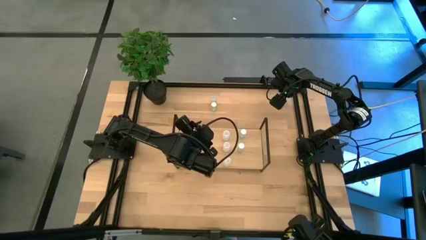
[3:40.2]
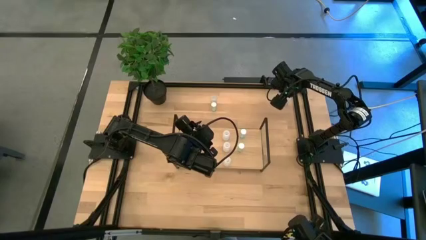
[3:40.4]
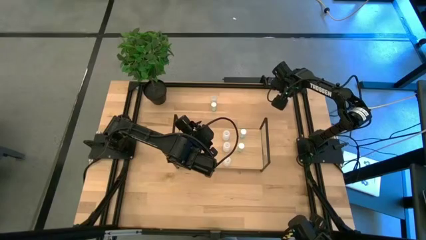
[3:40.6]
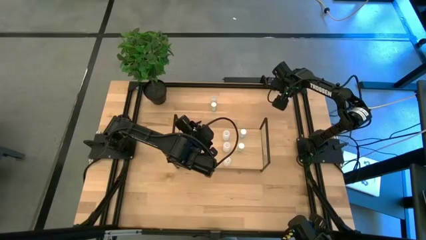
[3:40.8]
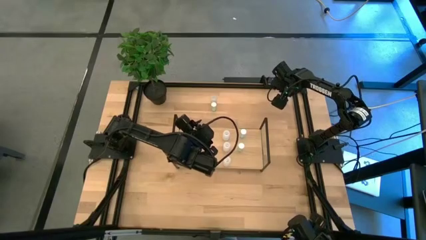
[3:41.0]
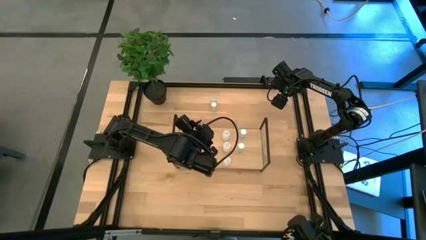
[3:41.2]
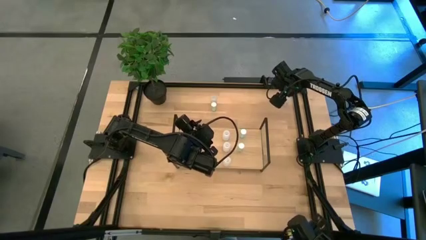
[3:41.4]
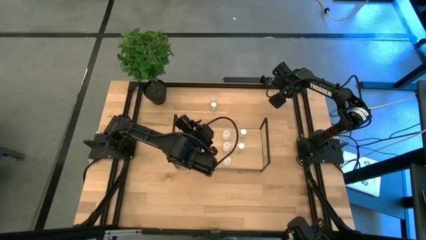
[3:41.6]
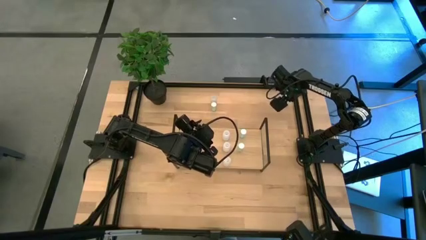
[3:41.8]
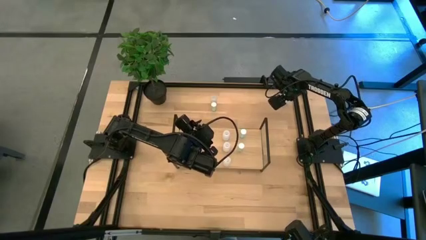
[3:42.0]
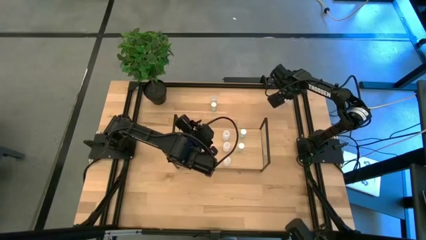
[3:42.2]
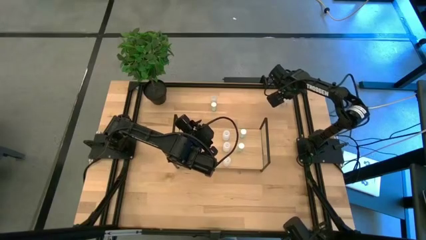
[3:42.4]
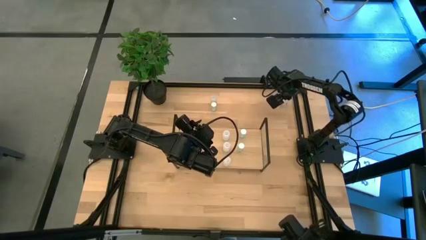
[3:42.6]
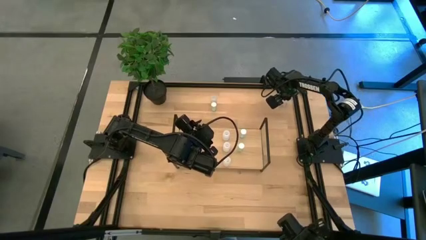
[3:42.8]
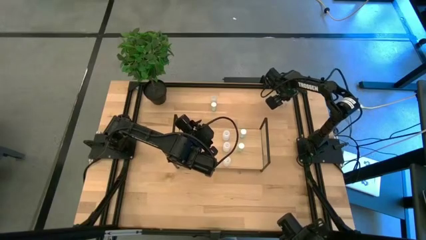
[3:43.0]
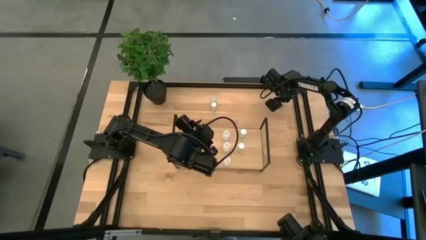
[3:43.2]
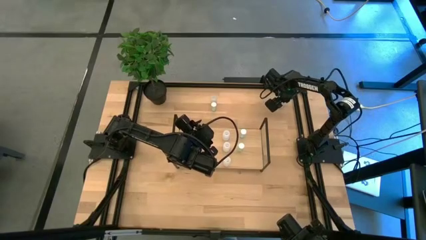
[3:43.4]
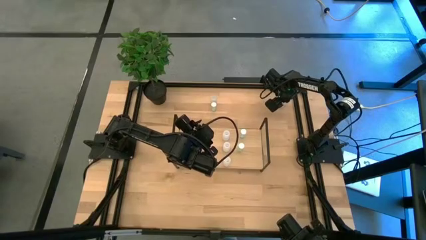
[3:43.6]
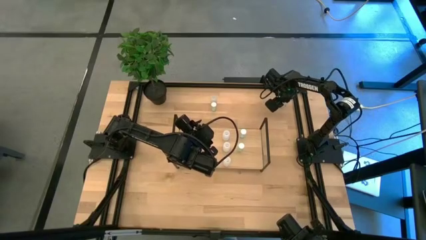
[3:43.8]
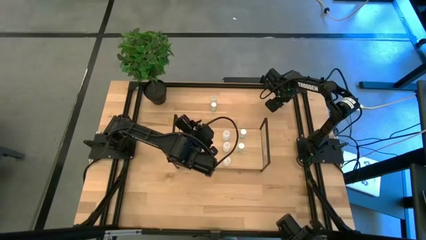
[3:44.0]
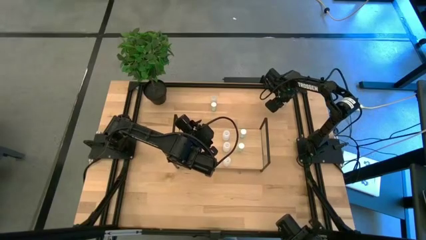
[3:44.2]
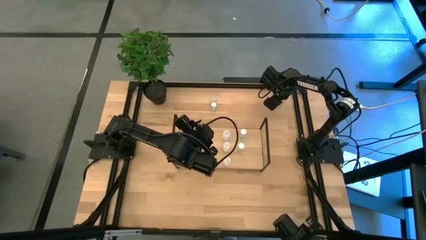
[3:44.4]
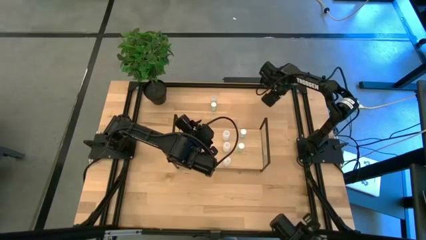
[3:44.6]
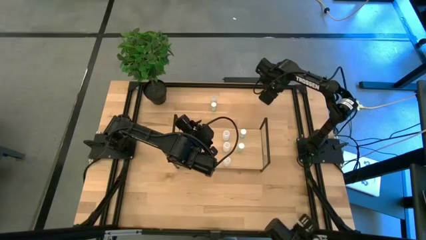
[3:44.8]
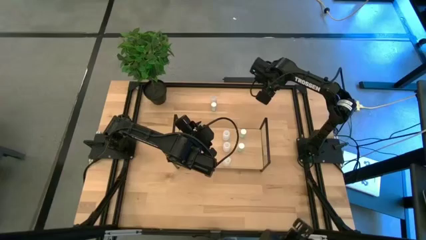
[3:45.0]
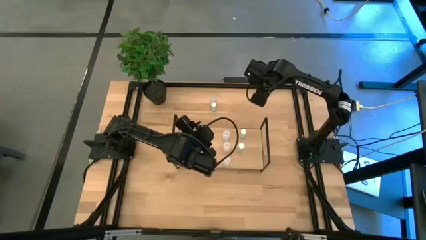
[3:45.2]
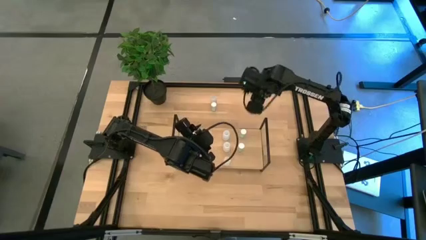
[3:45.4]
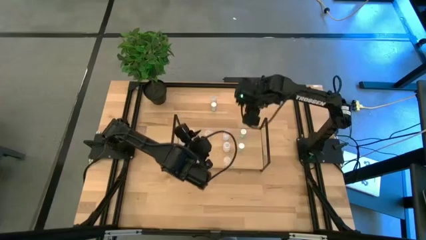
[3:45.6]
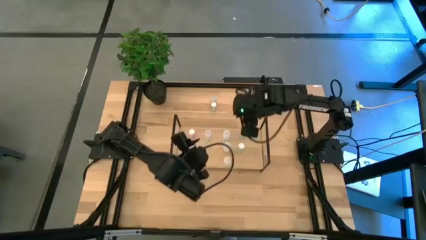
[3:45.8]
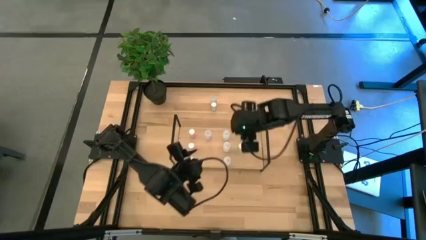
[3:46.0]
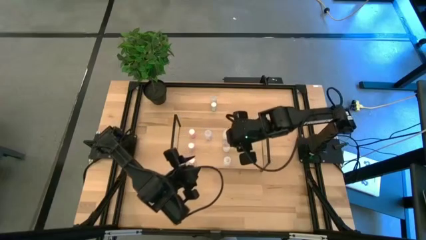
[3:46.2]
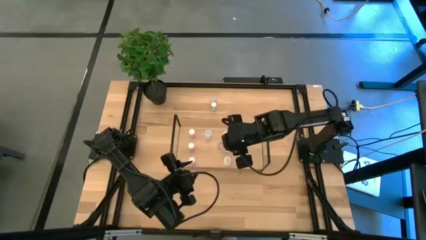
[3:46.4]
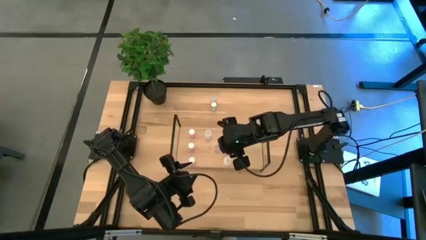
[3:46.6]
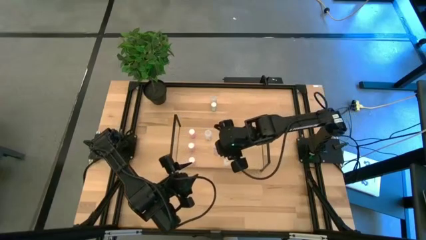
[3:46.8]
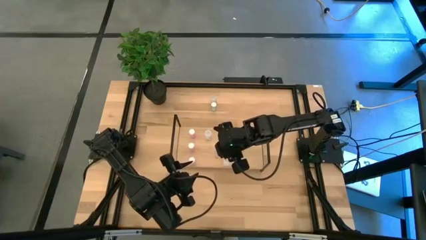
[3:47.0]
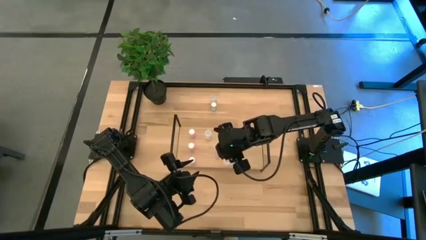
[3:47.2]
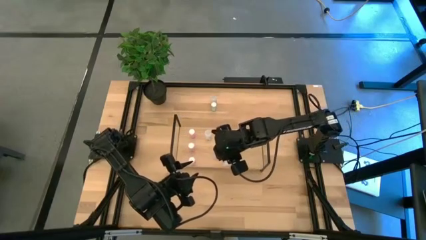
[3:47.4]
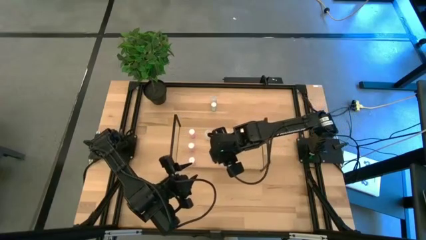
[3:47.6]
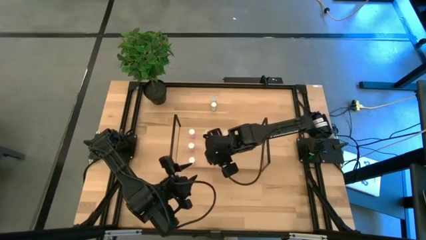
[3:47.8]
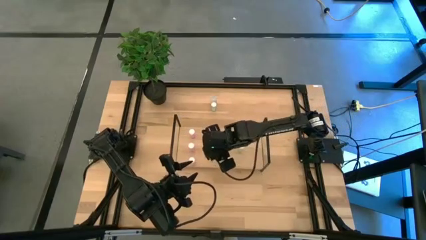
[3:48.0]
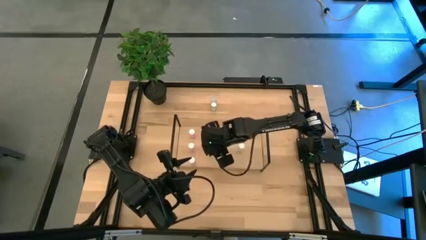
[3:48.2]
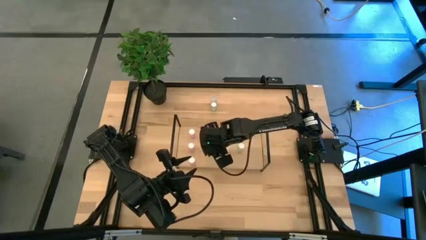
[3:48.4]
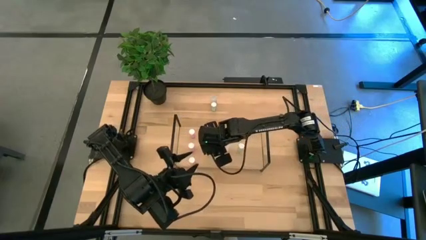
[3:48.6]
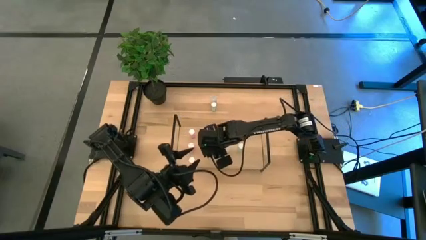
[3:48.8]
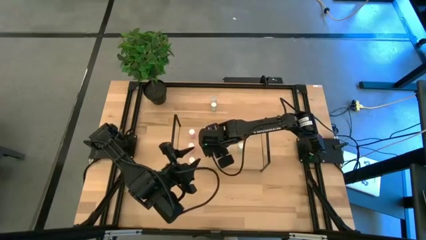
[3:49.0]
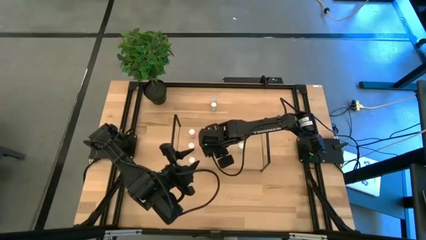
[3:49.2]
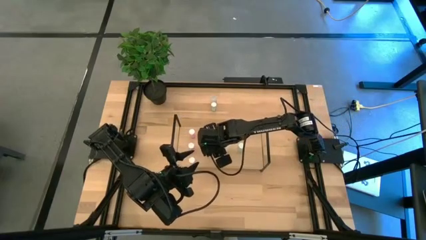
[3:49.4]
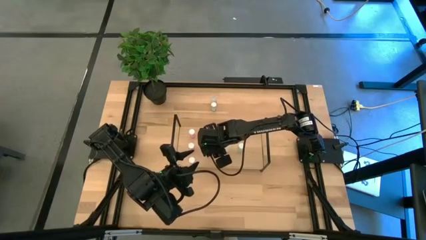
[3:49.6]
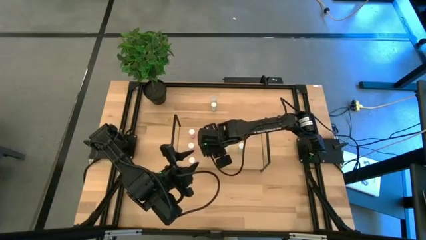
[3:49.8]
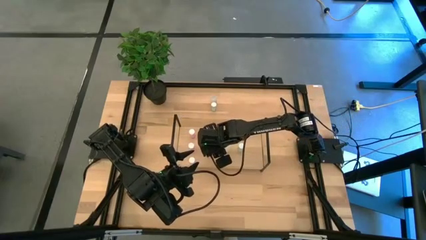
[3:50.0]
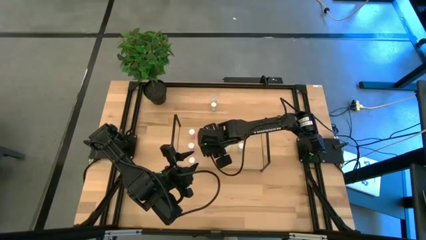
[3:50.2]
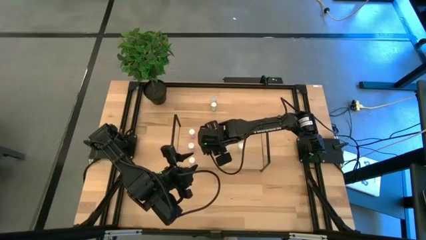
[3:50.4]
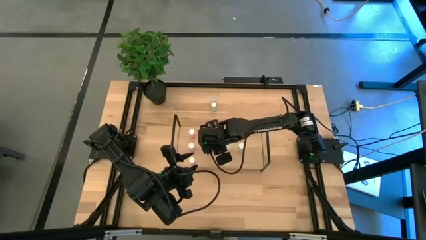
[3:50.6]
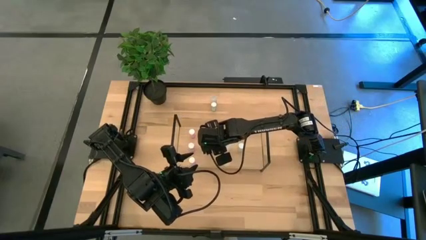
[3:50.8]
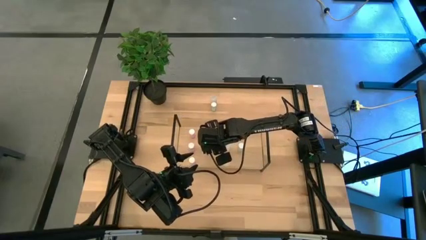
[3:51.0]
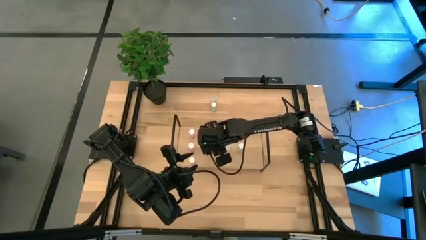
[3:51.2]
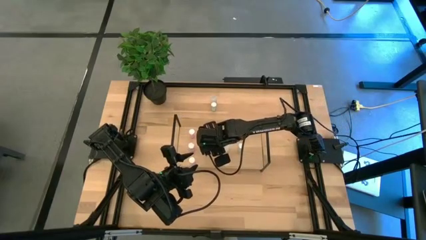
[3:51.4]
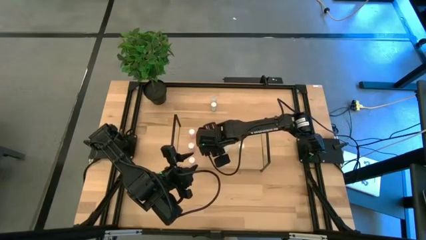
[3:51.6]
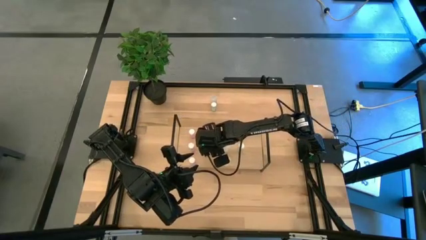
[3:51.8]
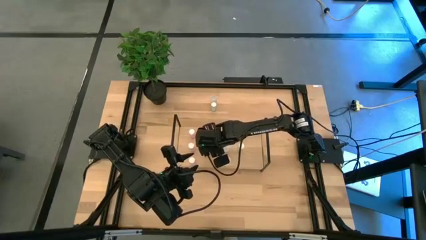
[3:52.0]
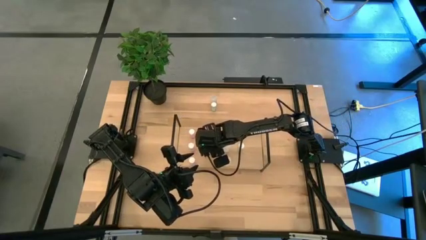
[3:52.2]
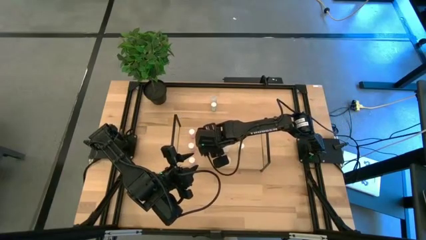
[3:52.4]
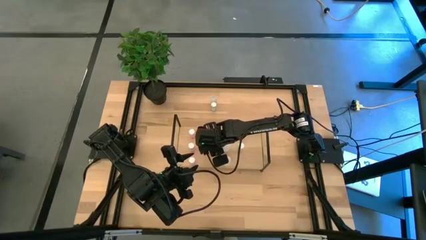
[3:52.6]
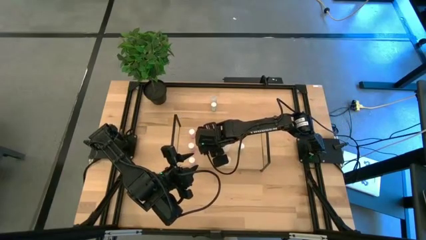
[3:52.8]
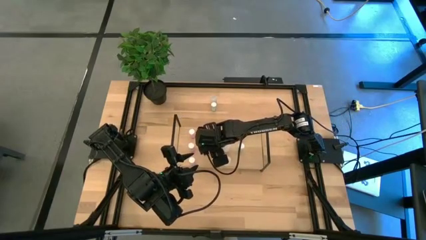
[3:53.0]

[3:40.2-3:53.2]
Task: Pick and place medicine bottles onto shelf by color
Put the right transparent pill bottle on the shelf aligned with the other transparent pill bottles

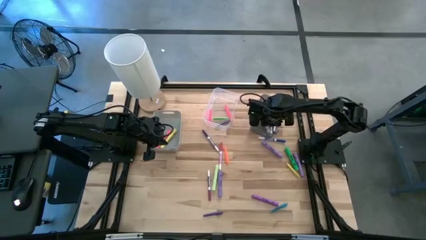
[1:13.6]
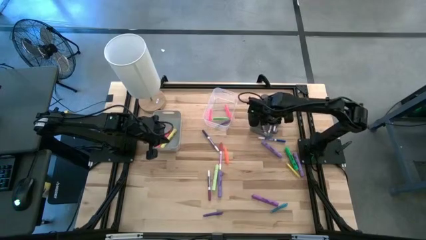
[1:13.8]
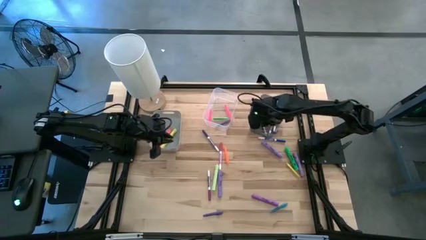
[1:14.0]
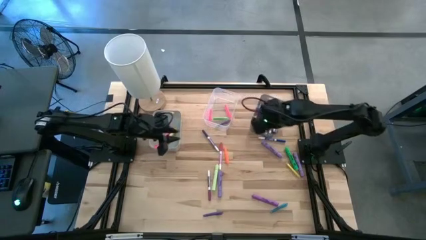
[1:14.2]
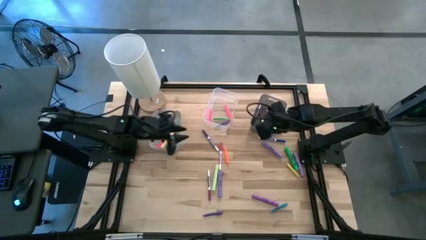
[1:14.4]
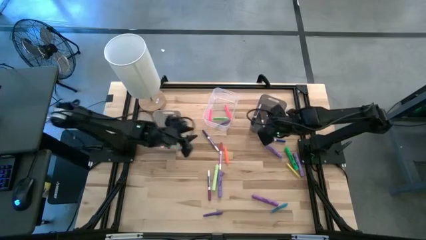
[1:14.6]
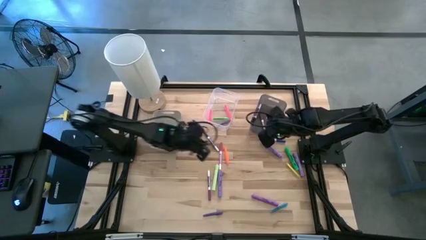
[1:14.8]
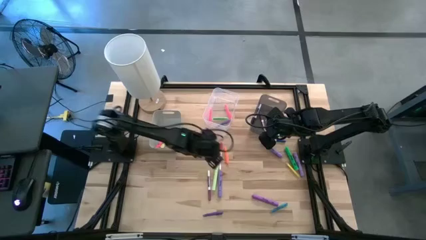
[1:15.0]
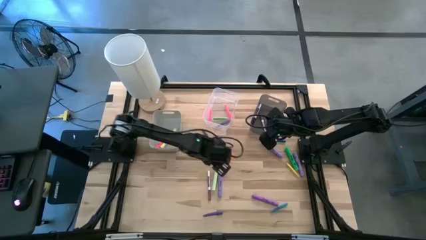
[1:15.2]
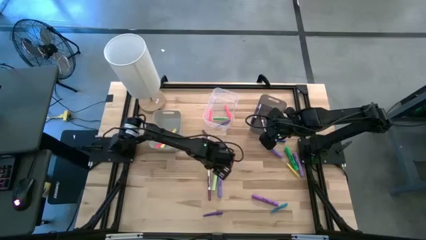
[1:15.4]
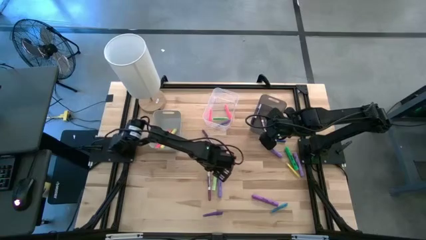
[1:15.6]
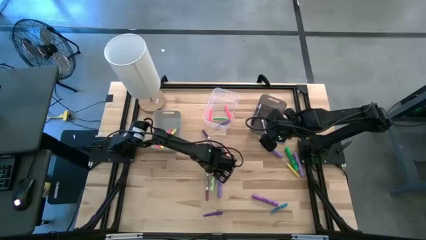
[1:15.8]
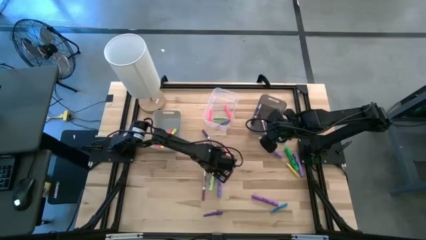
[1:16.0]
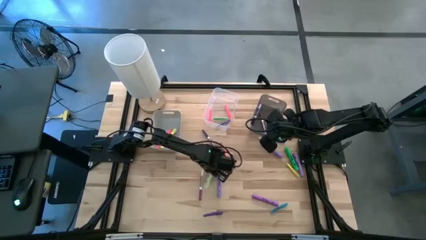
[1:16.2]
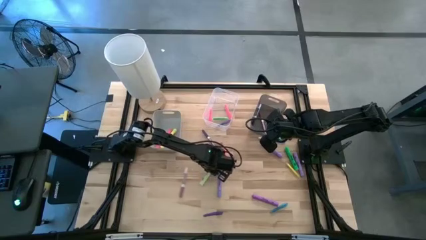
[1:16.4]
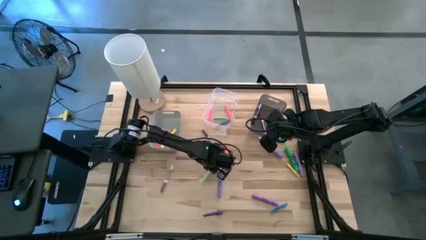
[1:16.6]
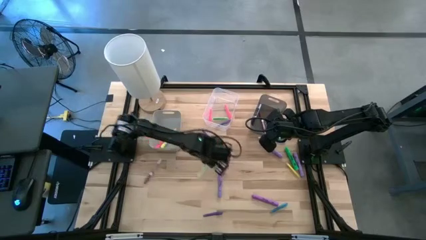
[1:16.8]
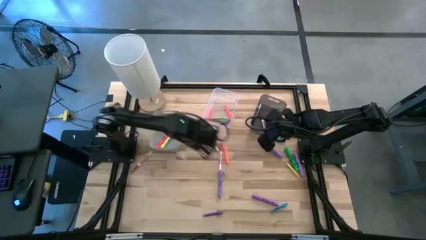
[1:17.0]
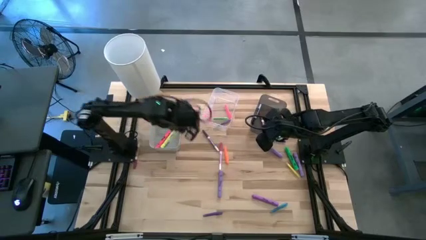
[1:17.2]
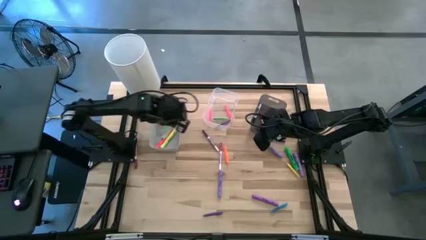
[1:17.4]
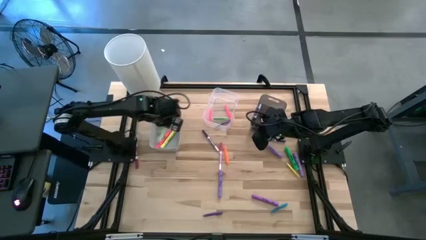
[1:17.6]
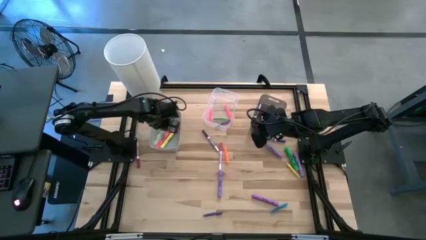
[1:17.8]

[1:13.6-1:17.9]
Task: Pick & Place Markers
Put the green highlighter into the gray bin
